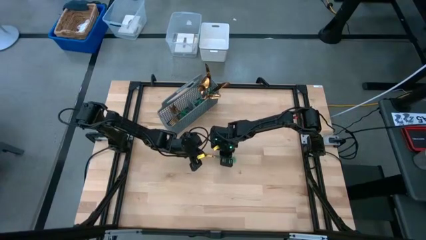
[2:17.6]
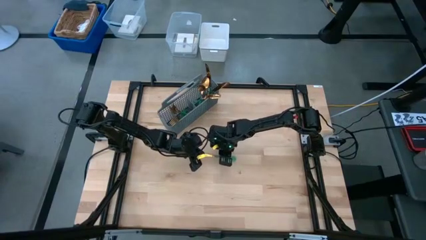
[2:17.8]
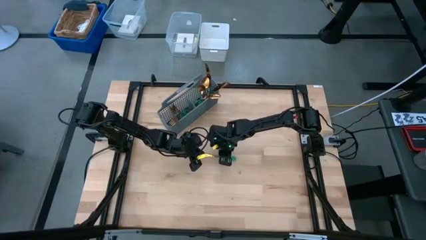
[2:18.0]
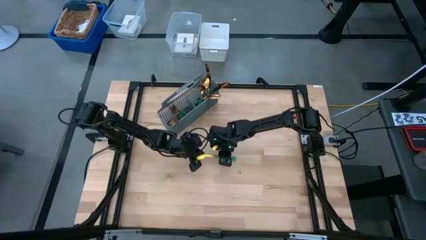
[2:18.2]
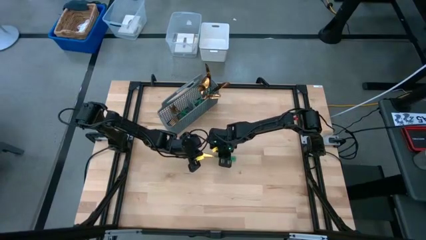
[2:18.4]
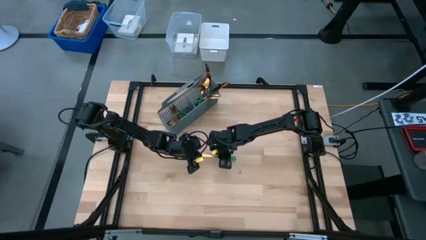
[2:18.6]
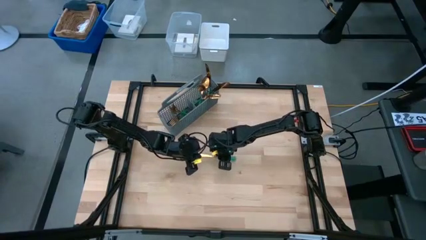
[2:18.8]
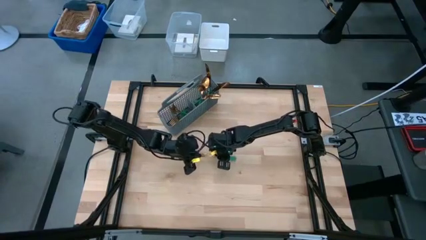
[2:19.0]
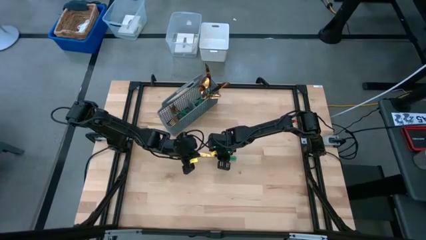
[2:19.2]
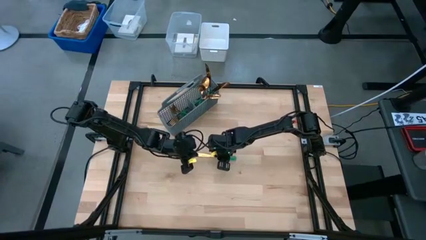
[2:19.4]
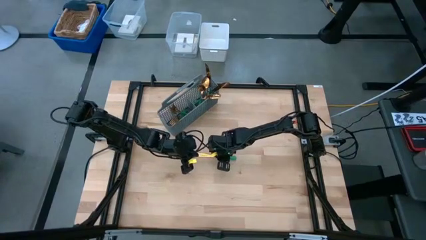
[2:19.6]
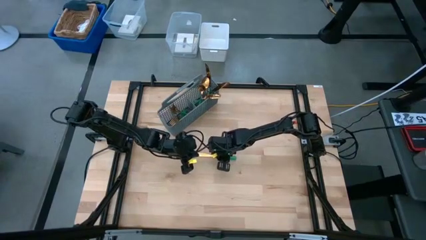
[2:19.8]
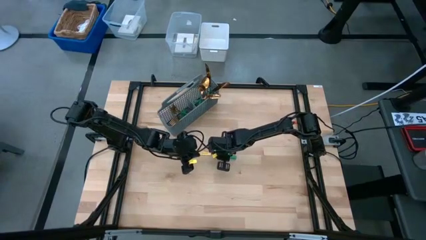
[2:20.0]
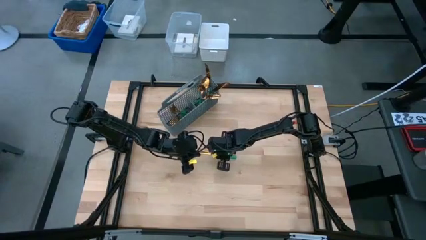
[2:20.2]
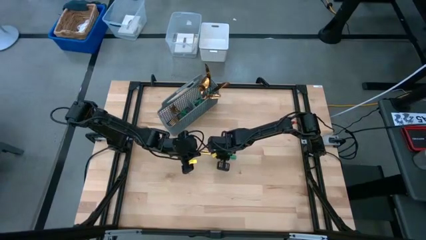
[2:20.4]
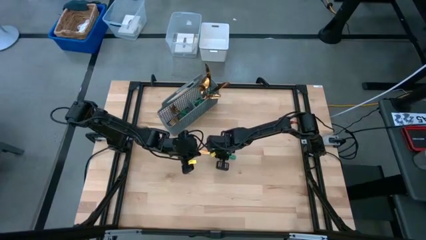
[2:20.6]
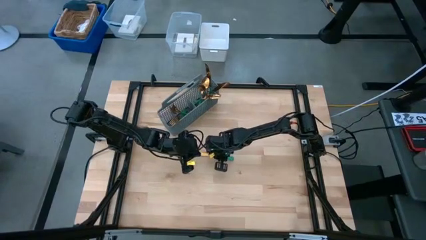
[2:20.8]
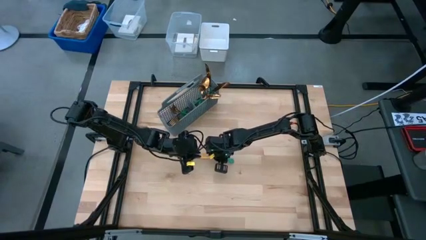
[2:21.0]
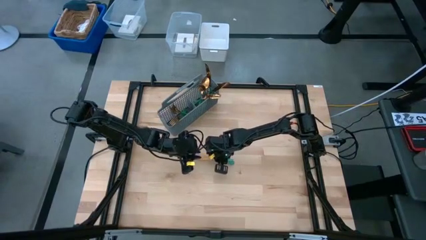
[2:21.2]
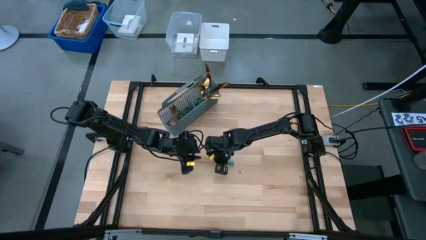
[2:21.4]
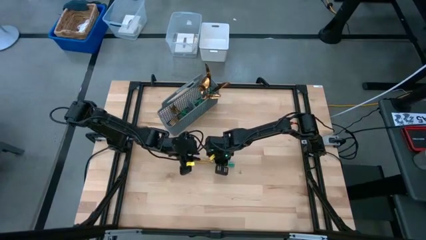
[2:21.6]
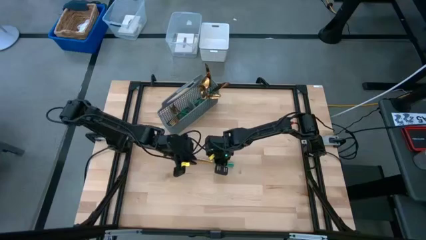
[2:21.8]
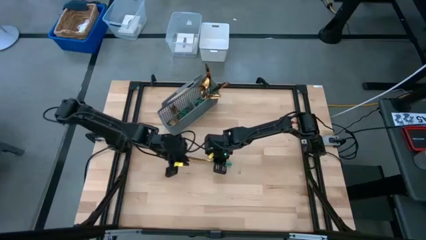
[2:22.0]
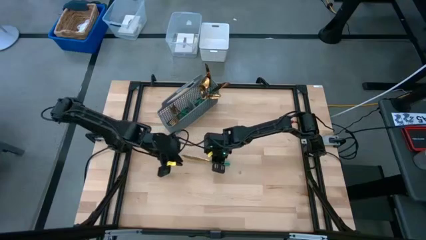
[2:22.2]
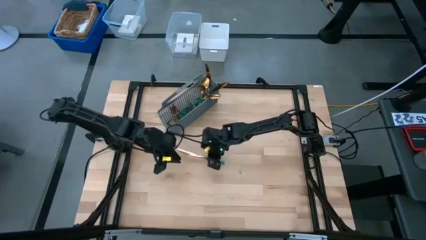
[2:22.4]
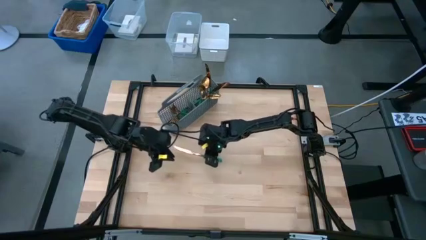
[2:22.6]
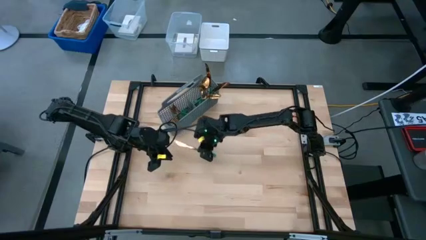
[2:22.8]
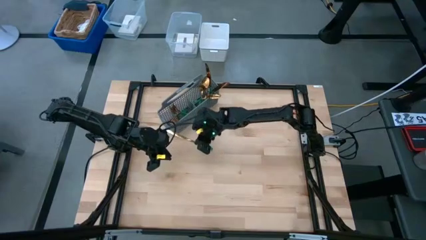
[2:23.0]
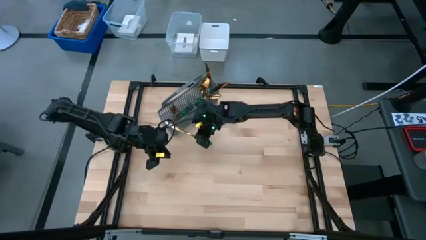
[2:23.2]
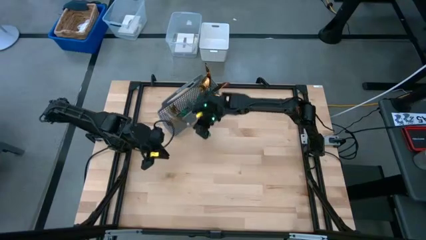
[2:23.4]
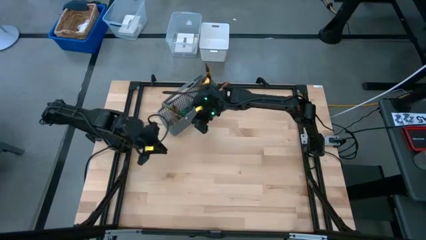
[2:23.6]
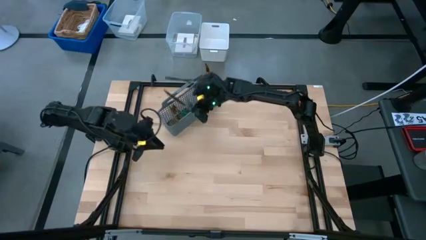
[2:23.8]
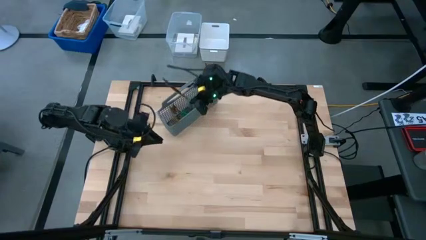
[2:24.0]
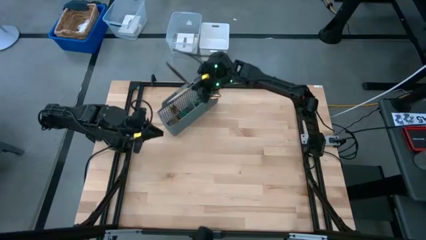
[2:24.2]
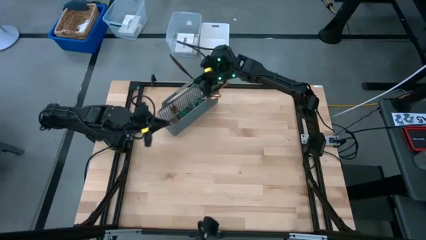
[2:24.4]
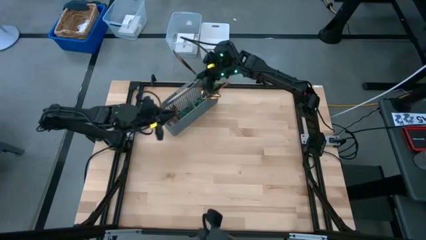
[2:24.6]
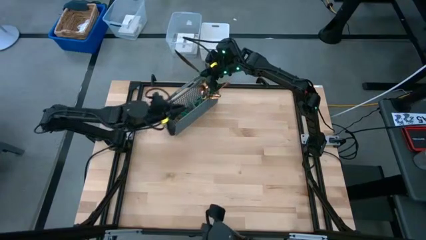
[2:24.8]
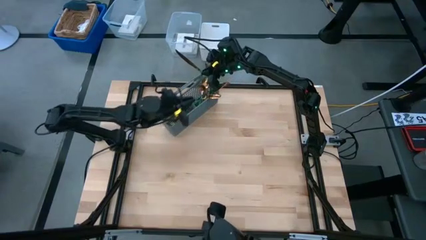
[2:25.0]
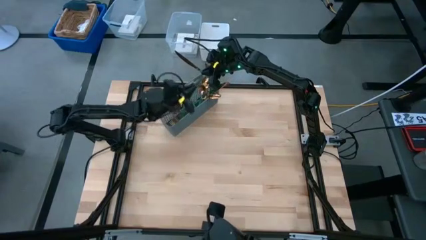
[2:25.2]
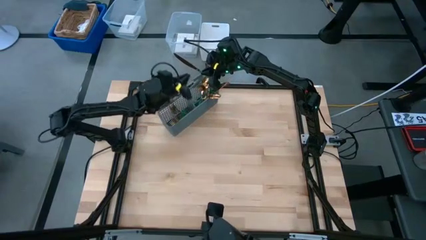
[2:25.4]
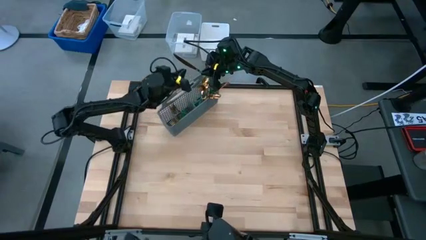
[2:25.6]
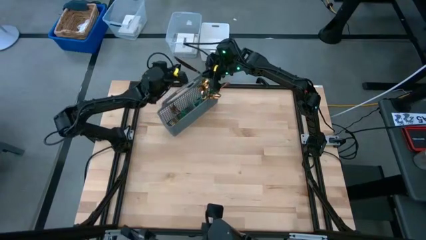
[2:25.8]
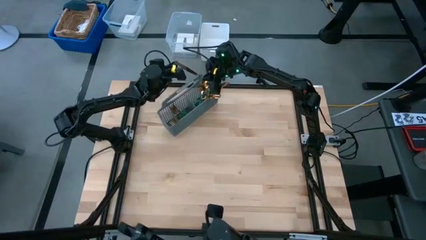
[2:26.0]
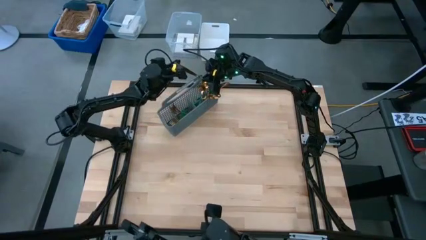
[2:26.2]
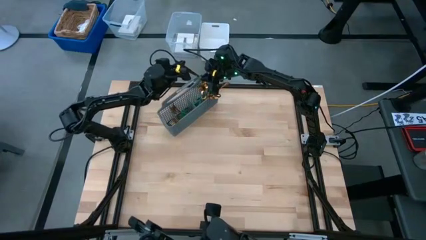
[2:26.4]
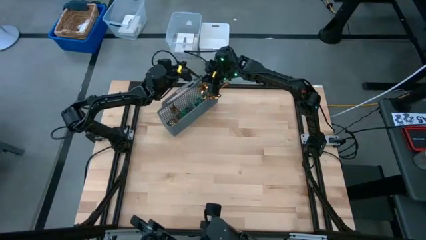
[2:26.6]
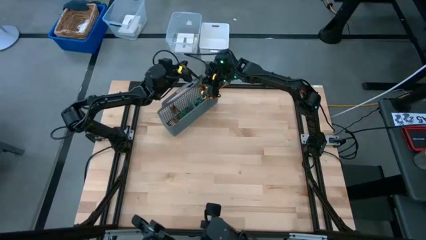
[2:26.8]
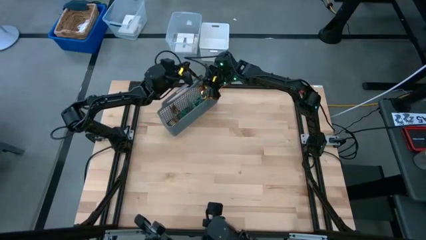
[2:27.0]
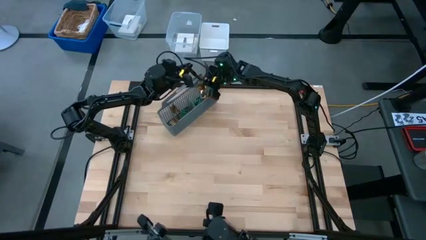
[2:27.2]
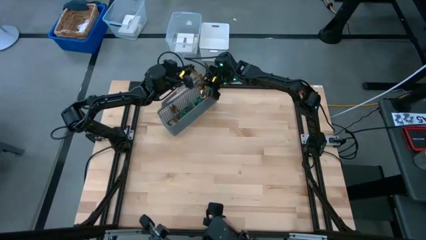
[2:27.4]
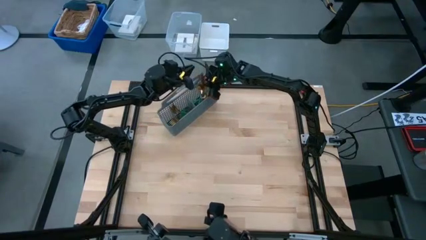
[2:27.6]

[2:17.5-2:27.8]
Task: Sort silverware
Put the green-gold table knife into the silverware basket

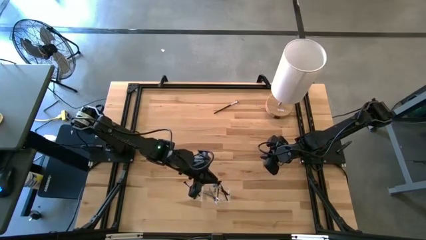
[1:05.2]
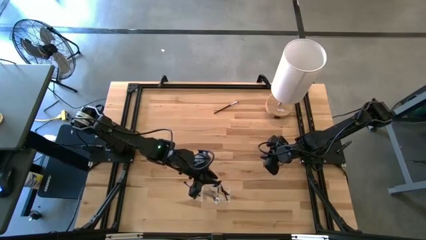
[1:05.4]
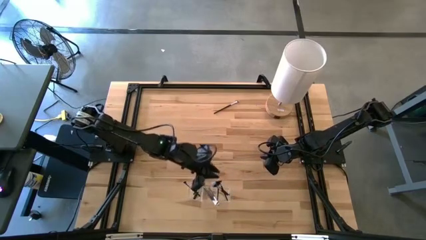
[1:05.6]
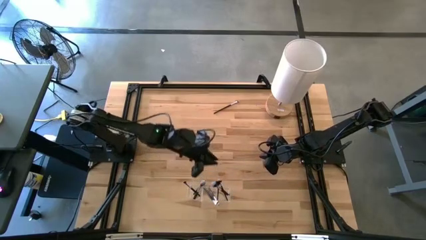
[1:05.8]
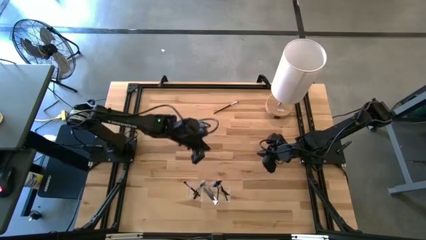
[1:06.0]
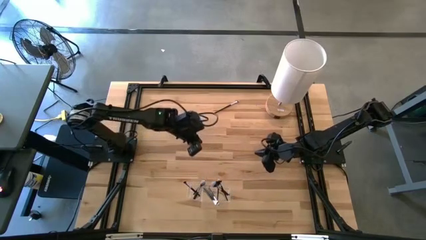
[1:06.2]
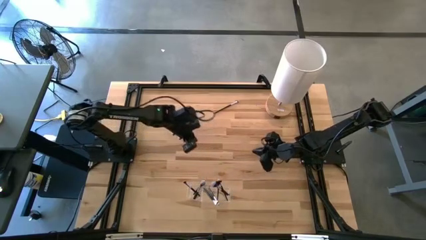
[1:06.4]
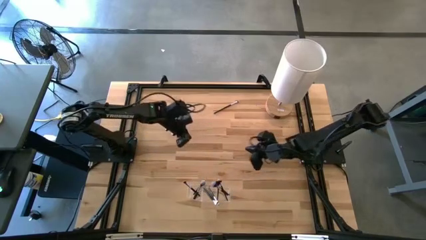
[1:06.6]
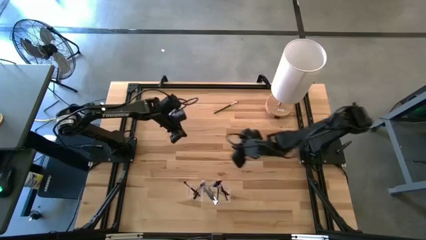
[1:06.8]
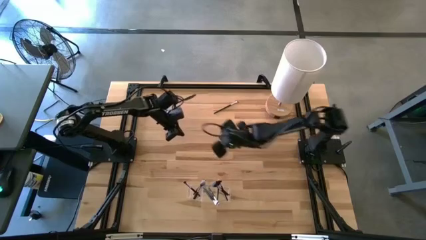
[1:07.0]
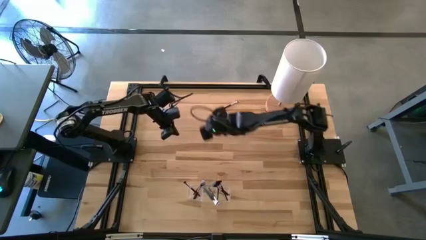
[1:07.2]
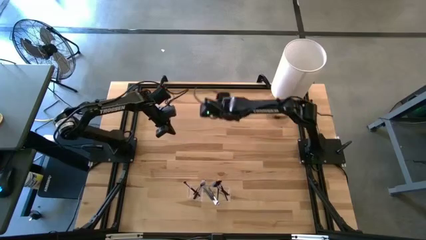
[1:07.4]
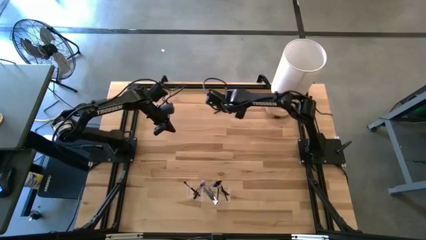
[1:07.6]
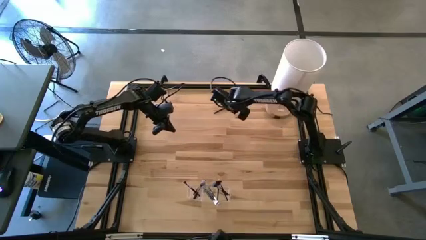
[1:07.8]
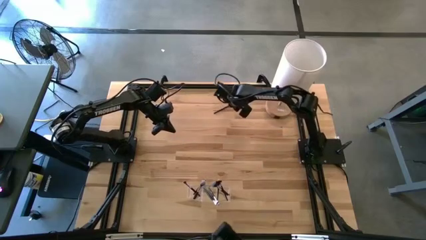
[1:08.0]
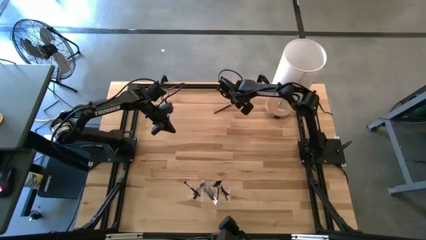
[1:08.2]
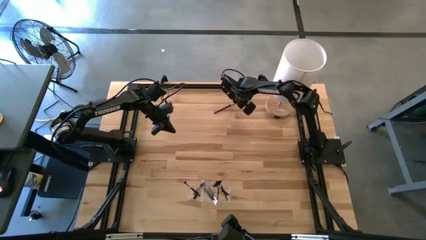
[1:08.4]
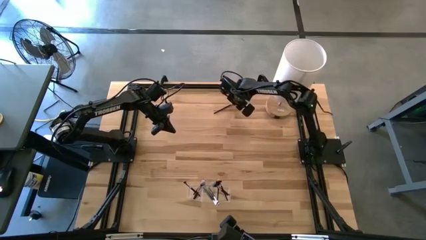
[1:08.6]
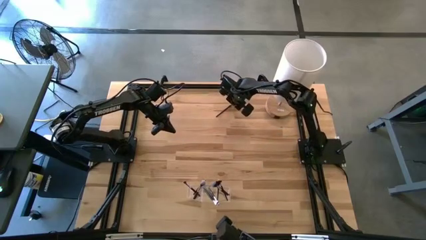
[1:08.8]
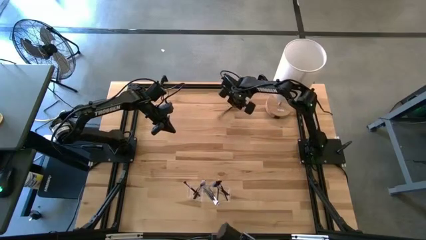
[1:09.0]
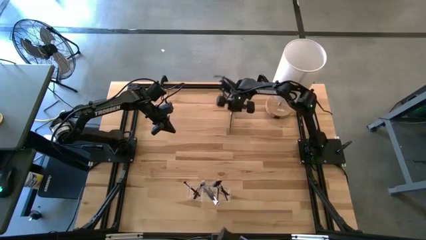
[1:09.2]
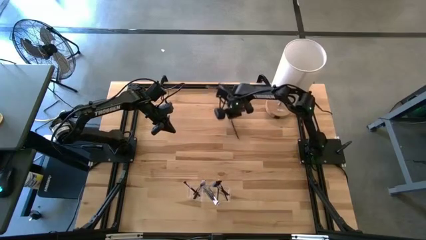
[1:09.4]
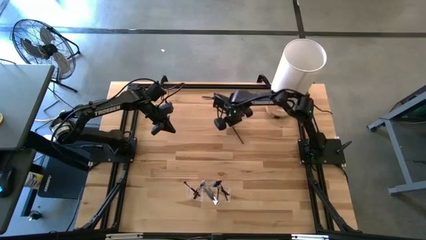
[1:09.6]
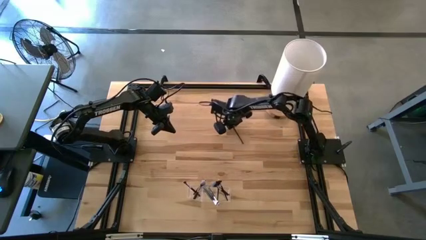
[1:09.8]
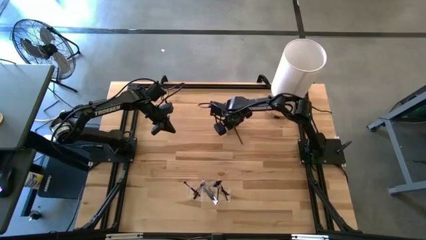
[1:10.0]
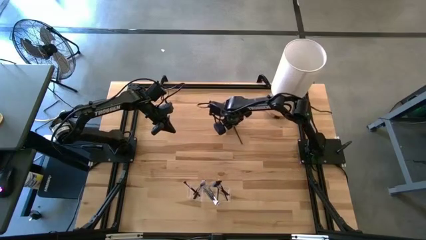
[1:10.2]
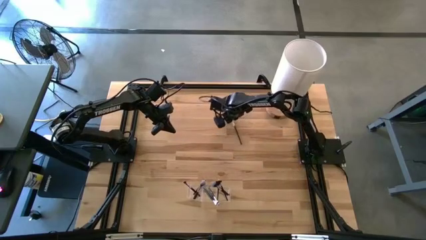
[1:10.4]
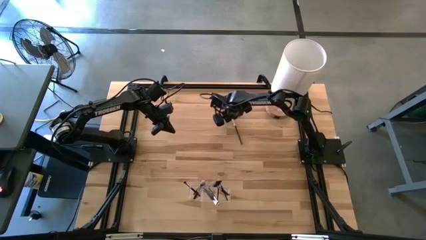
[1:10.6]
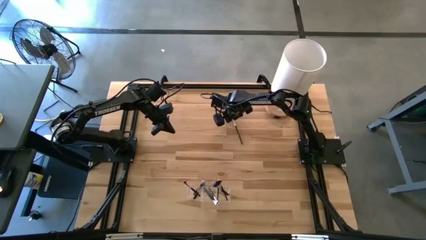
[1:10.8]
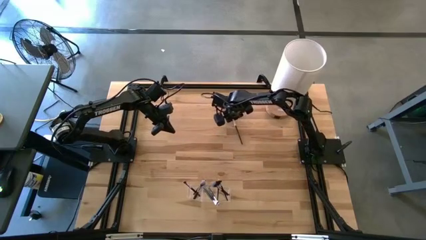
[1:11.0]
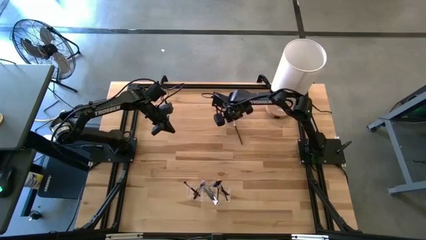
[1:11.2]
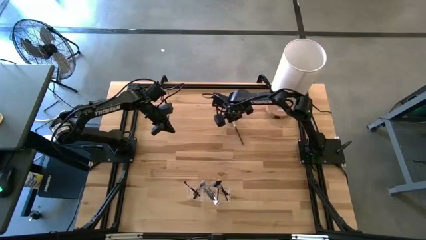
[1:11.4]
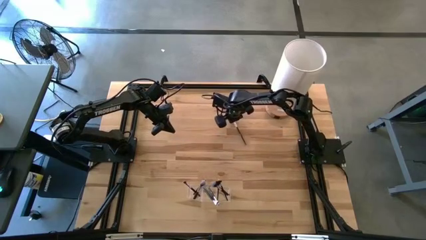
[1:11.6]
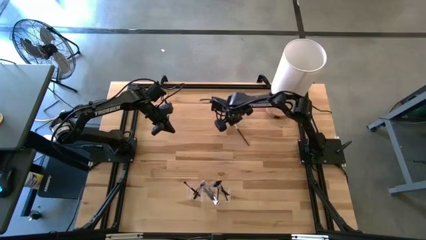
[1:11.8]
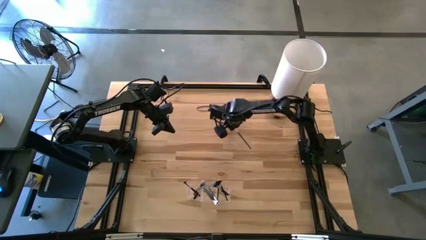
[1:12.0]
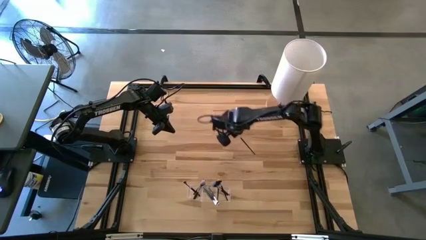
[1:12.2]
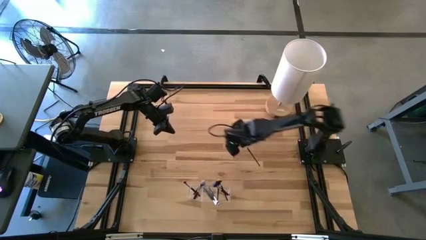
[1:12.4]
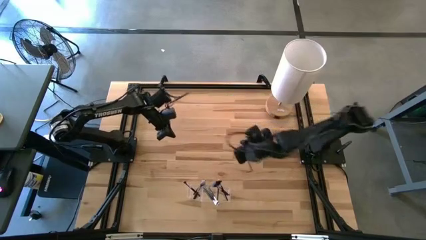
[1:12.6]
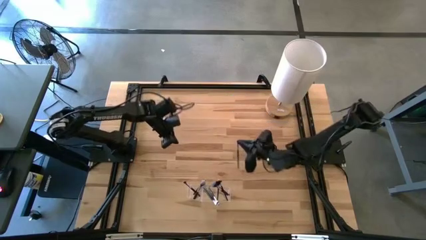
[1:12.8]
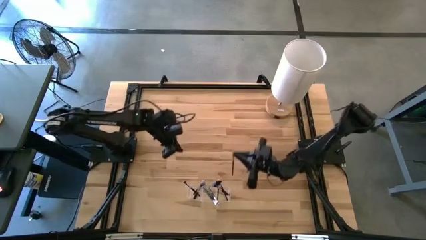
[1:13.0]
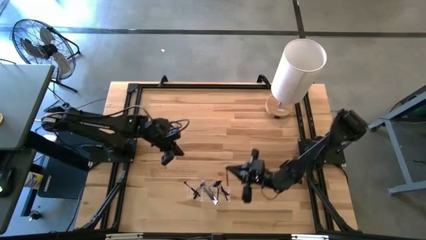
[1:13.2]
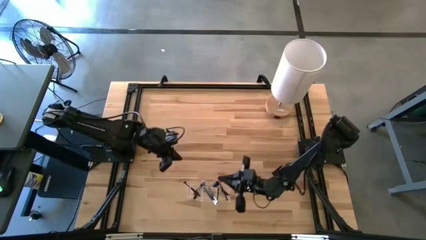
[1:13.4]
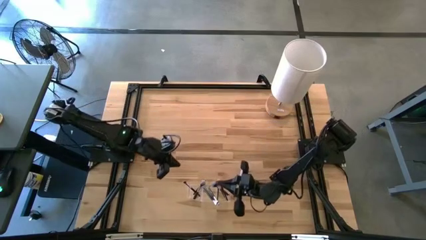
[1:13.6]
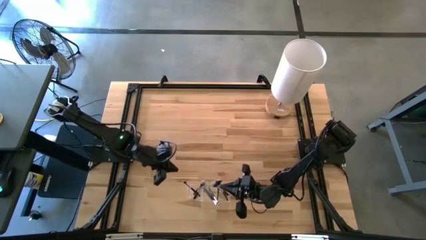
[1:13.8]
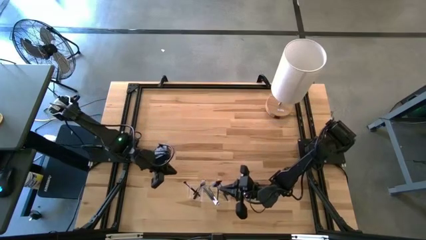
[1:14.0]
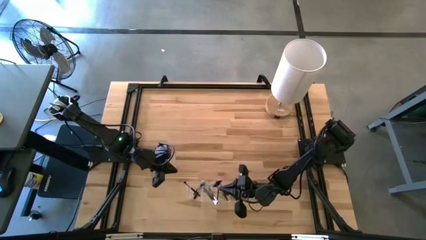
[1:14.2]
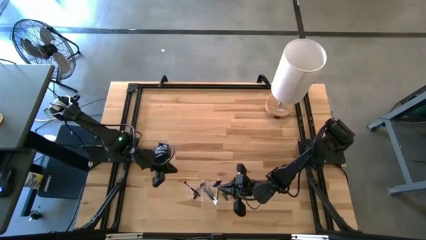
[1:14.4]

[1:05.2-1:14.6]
Task: Put items in baskets/containers
Put the black eyeshadow brush into the transparent organizer
